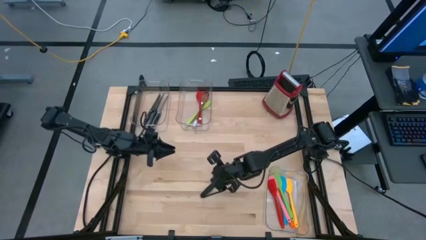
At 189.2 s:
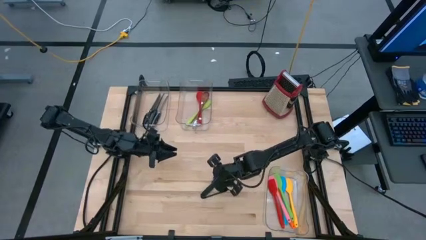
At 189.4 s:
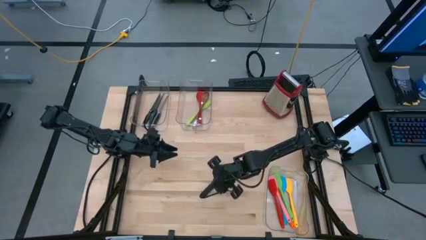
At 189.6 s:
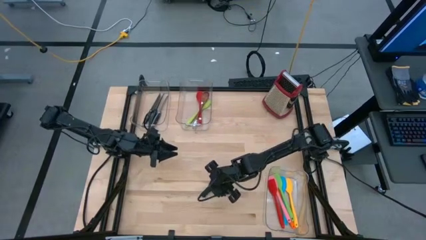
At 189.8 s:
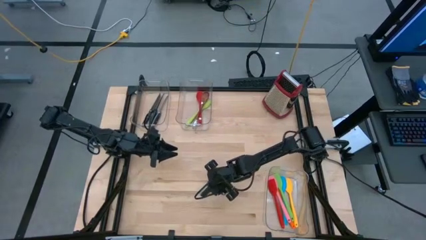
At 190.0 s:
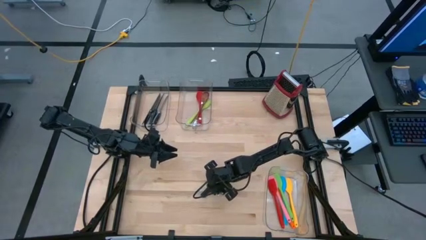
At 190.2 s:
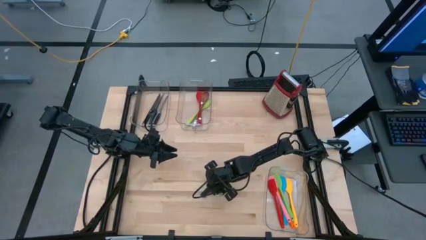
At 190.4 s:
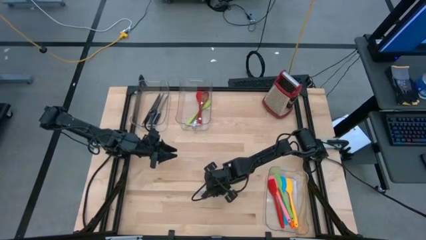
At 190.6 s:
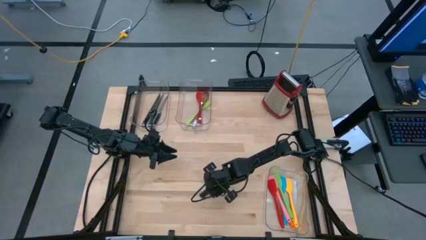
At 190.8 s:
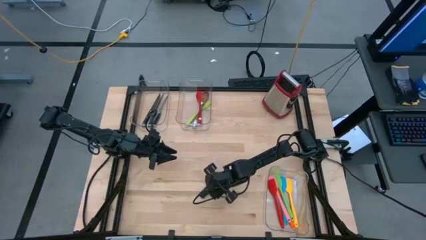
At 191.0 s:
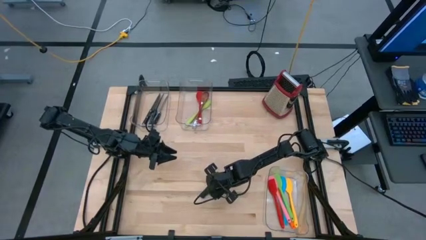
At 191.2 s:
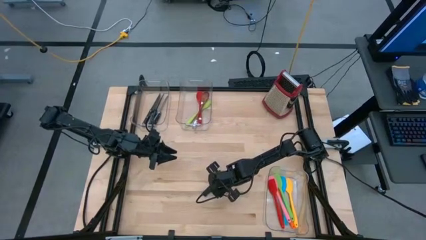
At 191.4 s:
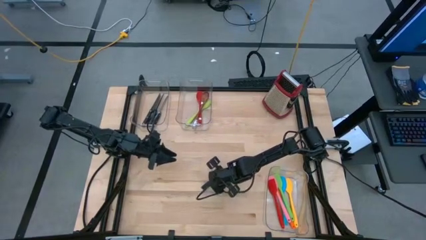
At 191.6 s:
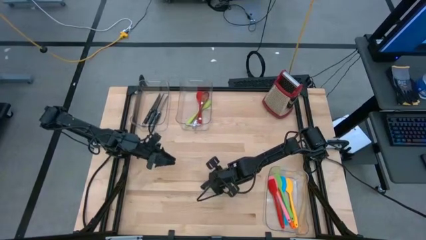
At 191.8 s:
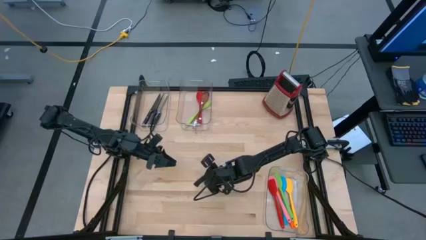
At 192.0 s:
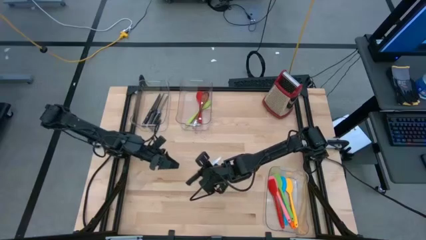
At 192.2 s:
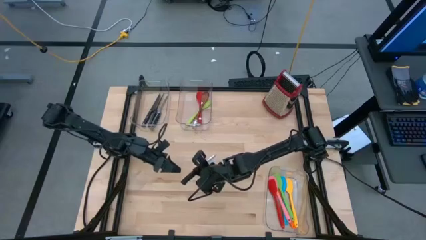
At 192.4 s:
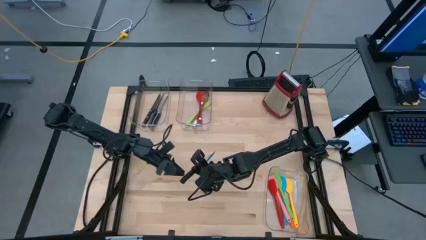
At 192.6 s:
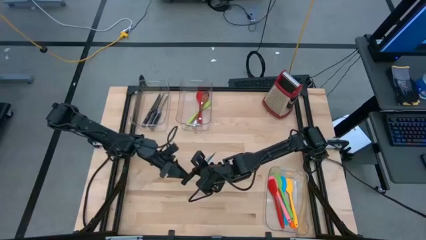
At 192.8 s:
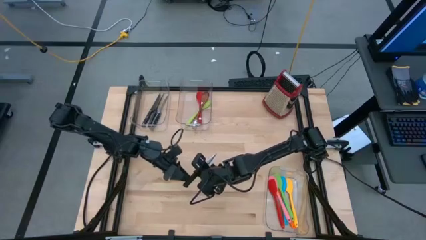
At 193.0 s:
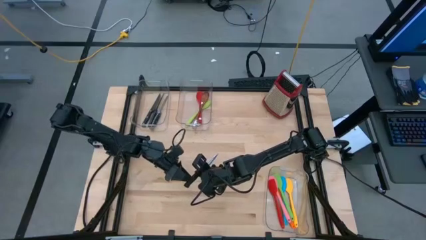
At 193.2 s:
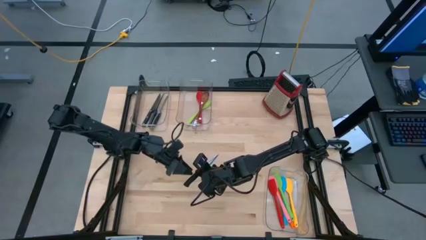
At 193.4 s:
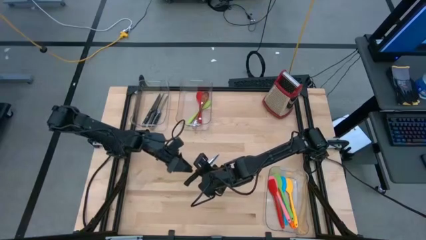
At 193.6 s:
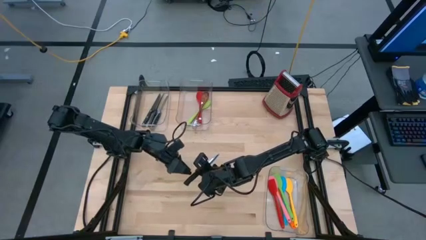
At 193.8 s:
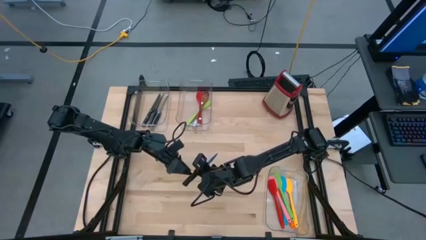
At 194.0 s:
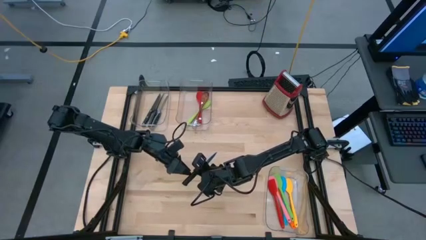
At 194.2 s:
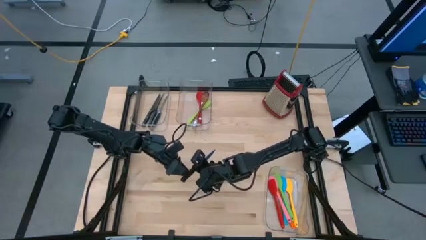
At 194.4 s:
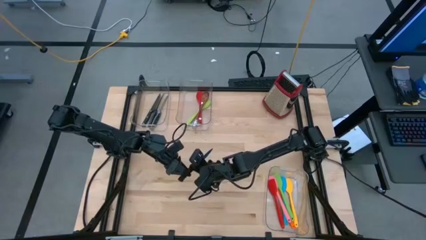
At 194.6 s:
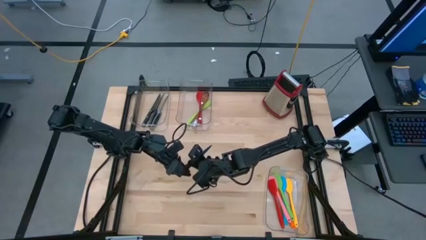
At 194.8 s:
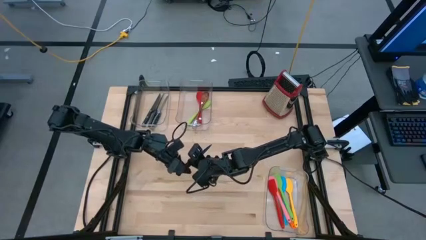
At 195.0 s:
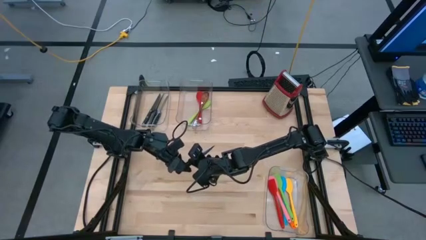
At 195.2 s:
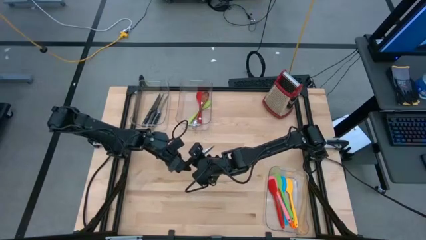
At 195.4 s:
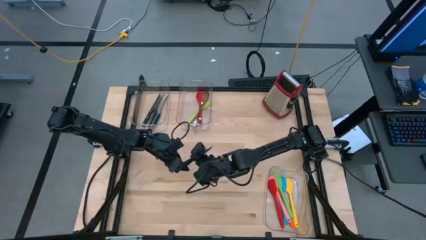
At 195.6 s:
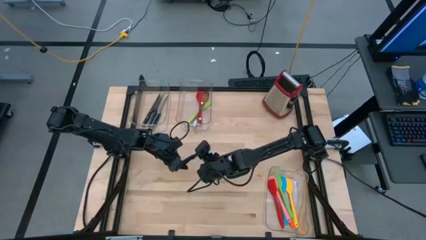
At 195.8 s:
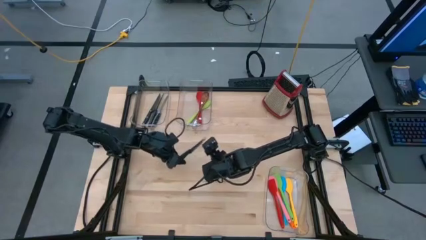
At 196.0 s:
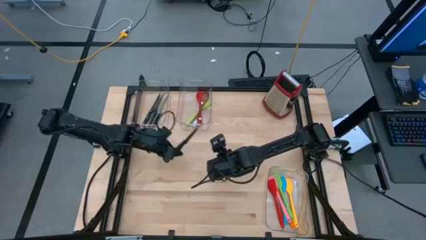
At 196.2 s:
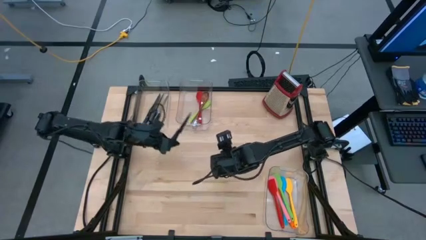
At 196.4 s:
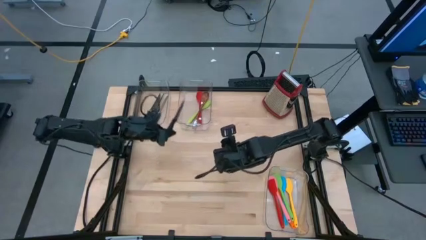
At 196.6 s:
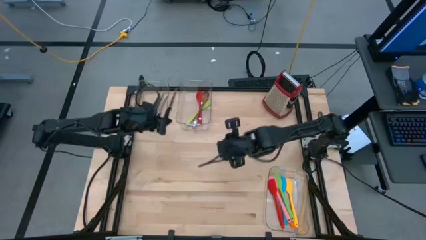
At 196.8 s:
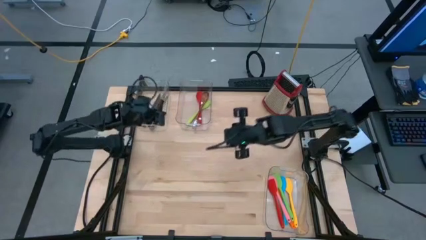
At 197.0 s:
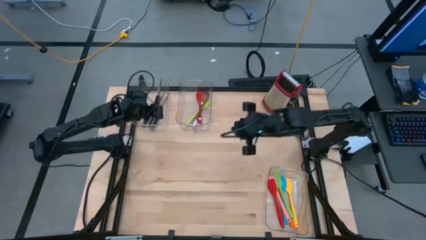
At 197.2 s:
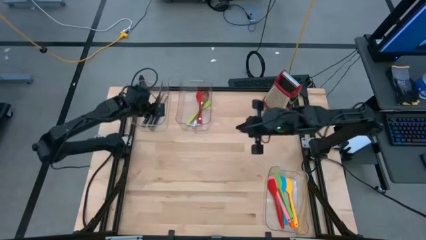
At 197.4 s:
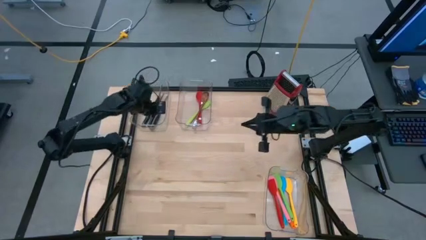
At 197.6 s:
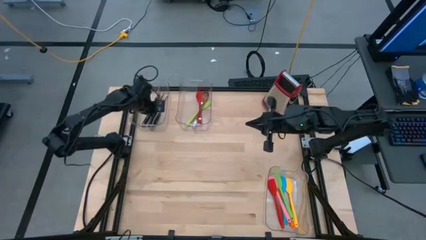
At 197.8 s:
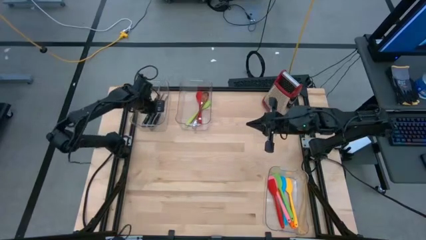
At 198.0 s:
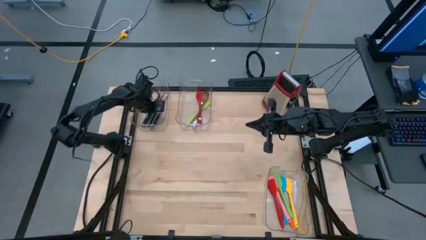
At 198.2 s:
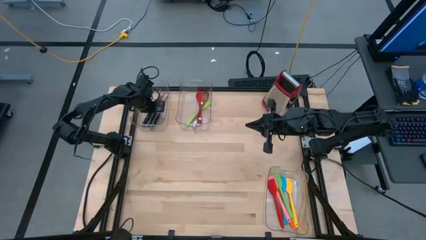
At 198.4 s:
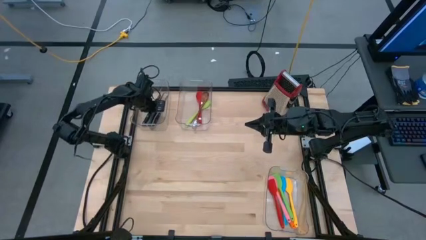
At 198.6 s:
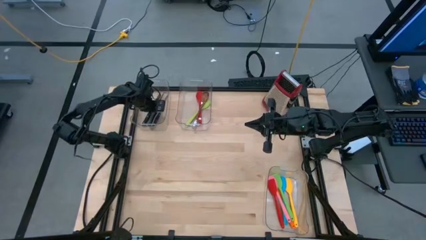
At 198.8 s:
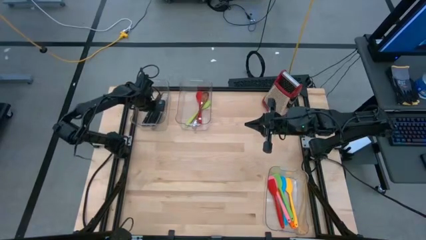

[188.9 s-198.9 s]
Task: Pick & Place Kitchen Items
Put the black knife into the top left transparent bin

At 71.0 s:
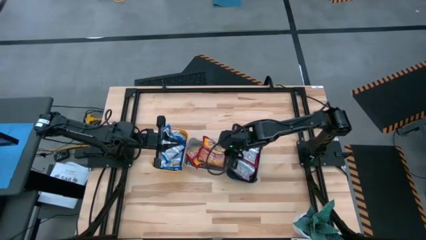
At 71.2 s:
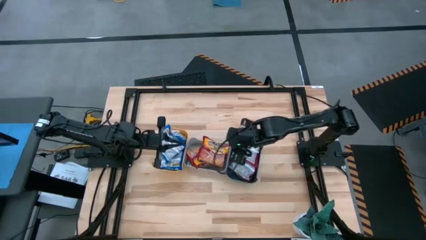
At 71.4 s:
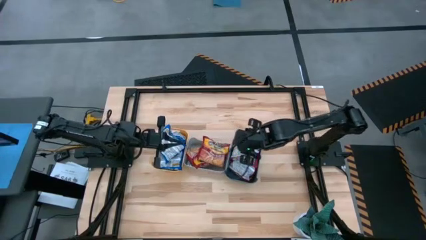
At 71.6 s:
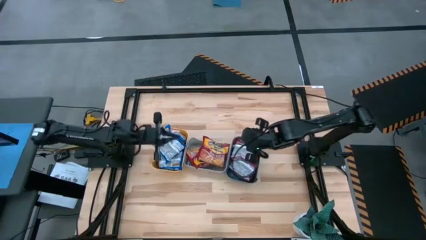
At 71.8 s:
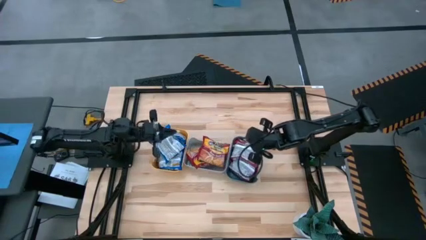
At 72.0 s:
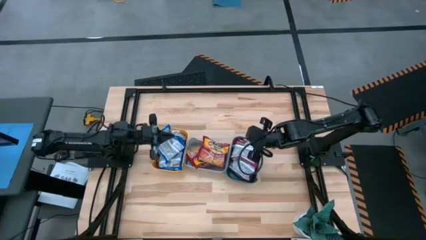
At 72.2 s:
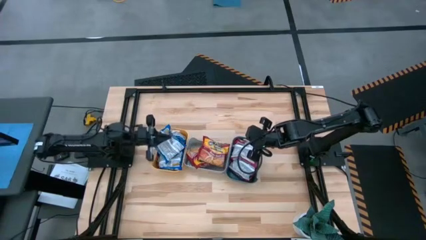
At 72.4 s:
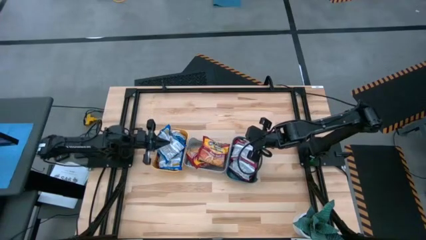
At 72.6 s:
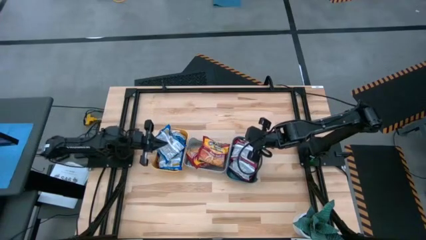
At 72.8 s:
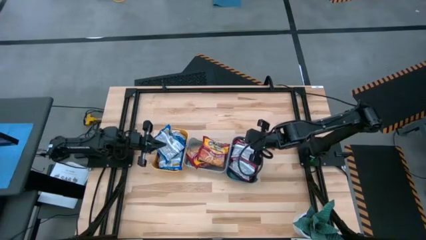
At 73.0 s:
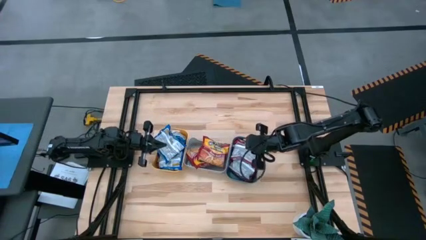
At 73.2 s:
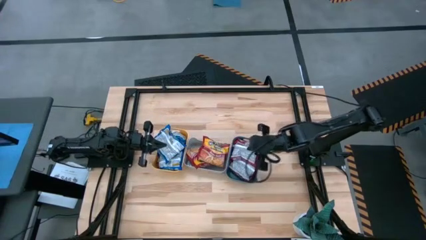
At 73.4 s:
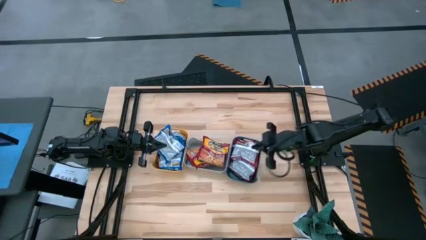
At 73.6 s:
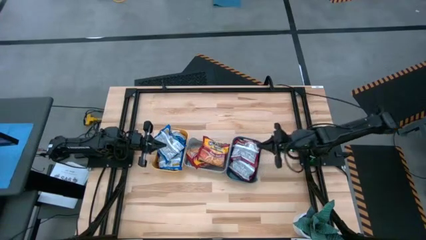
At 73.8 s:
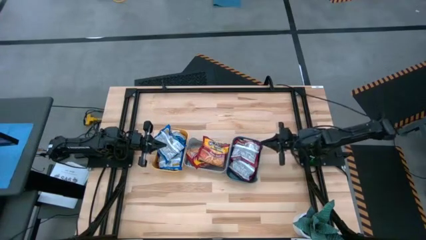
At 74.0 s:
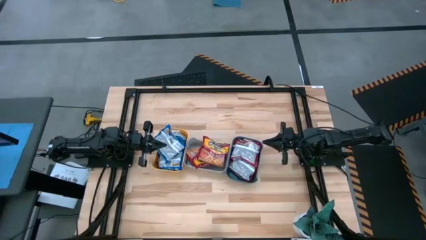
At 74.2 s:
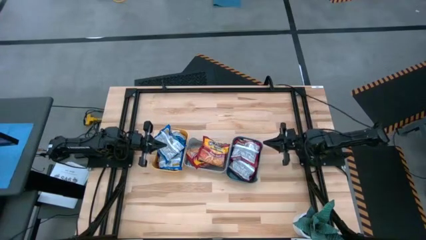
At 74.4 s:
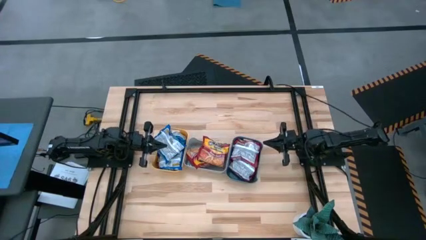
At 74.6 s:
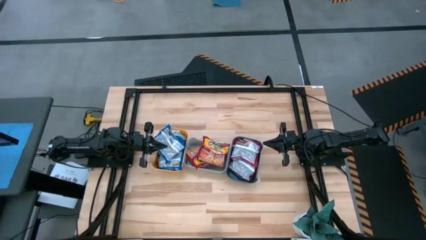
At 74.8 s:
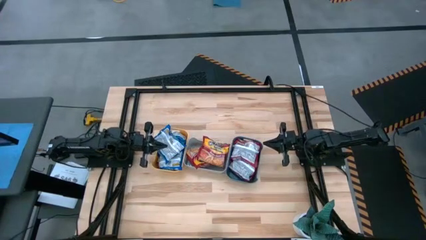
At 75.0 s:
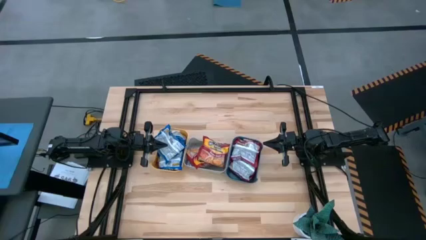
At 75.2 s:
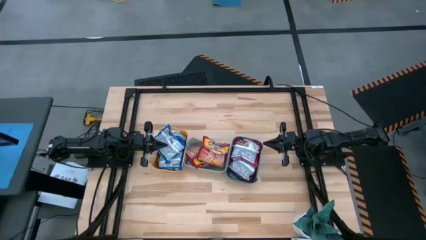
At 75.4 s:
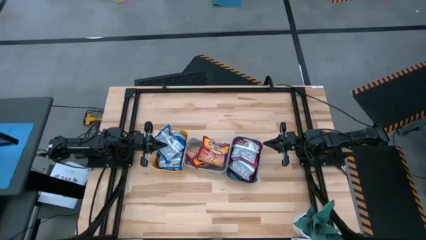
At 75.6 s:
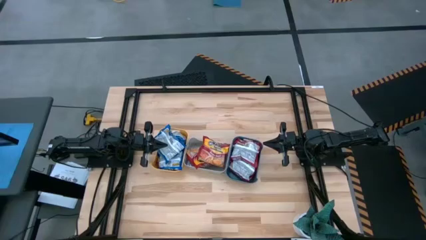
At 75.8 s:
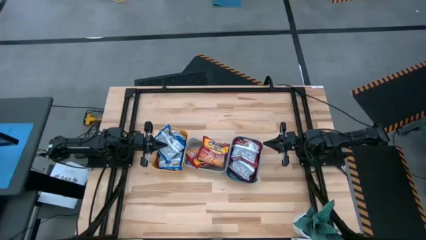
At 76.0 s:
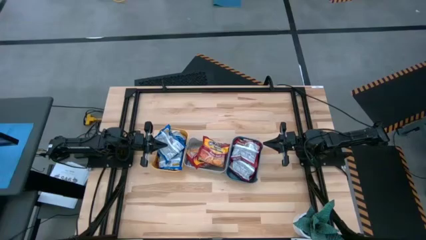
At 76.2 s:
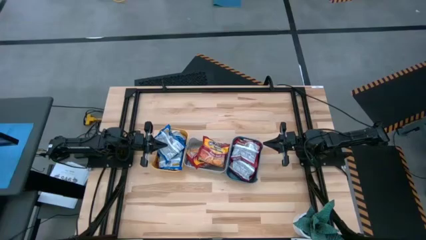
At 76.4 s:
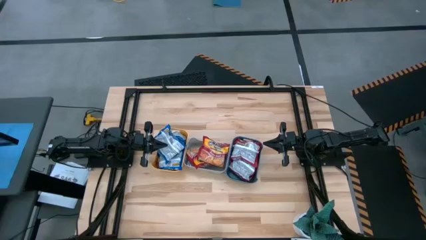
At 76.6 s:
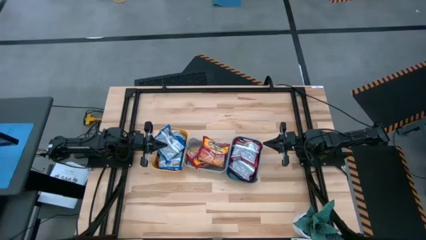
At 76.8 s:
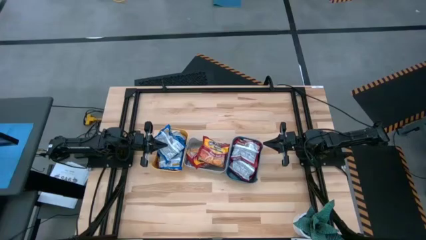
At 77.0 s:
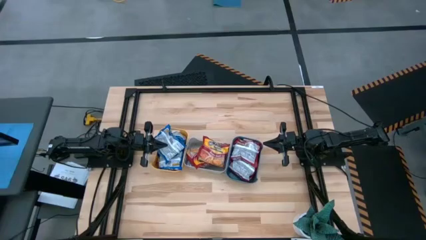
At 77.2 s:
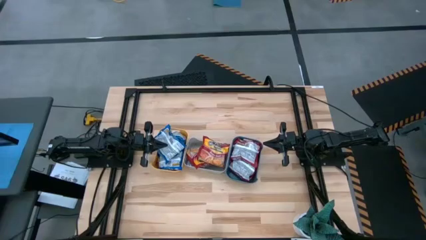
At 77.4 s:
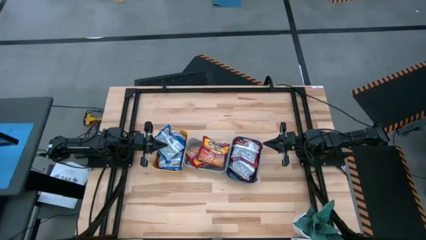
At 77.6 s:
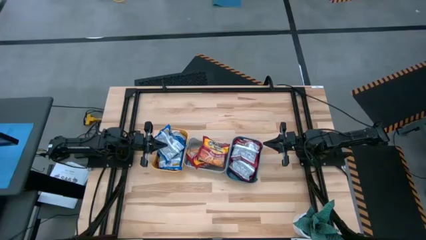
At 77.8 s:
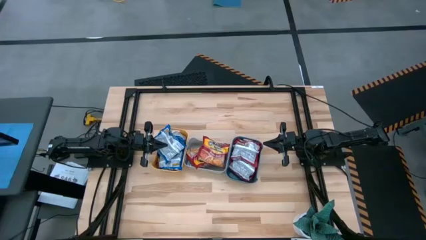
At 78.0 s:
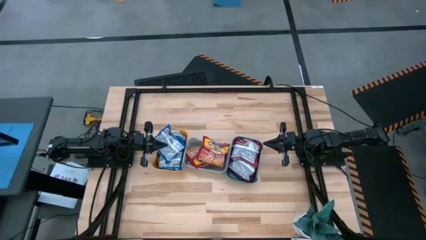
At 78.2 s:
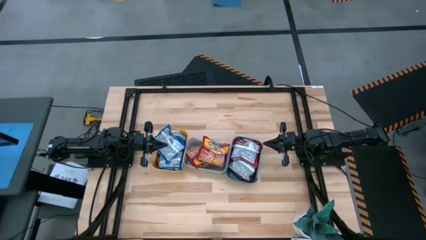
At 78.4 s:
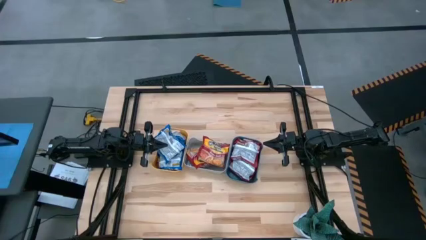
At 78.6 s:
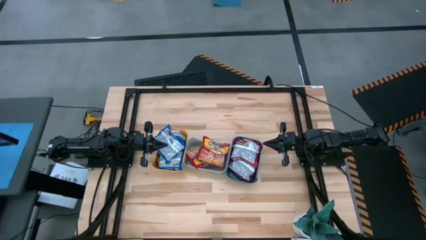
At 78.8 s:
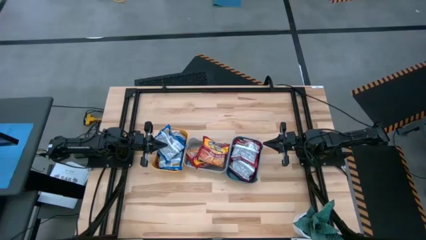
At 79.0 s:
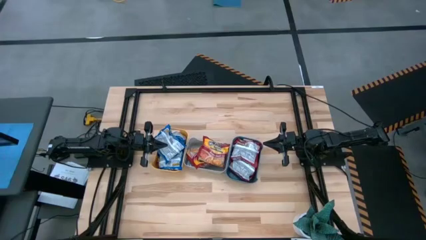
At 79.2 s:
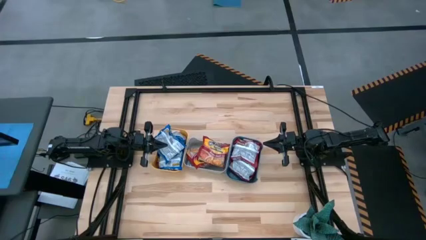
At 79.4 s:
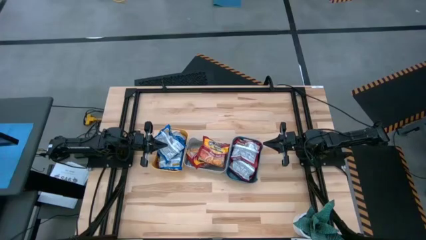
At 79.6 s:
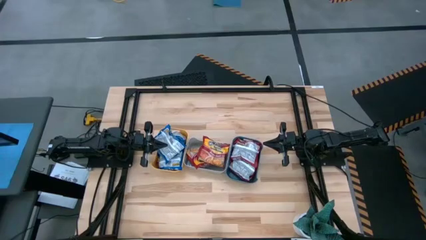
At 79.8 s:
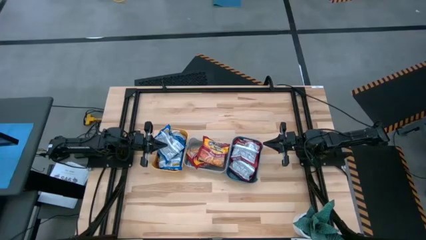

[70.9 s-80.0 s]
Task: Sort Maruchan noodles
Return to Home Position
